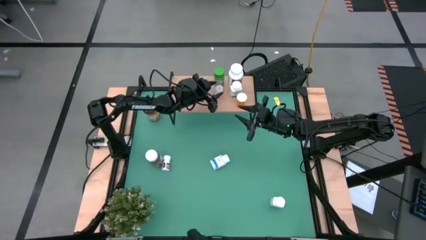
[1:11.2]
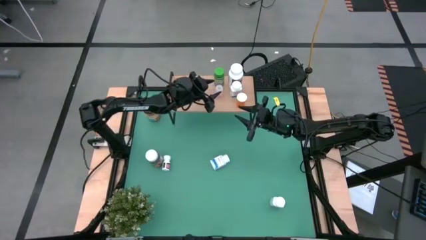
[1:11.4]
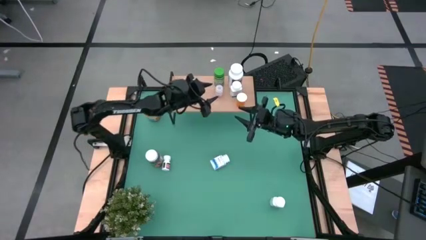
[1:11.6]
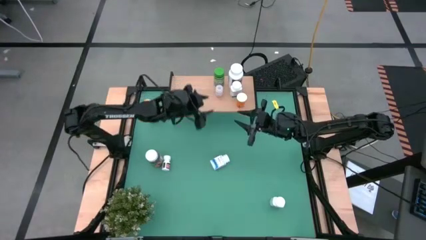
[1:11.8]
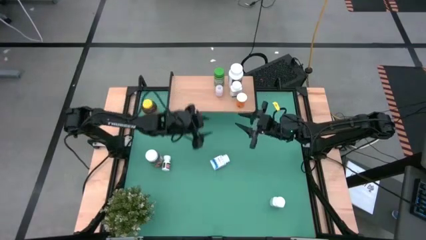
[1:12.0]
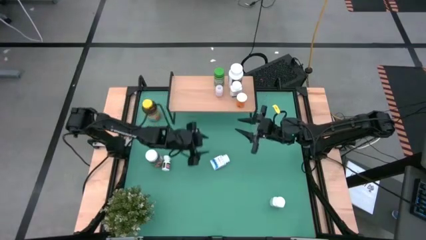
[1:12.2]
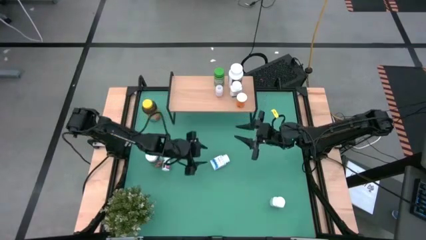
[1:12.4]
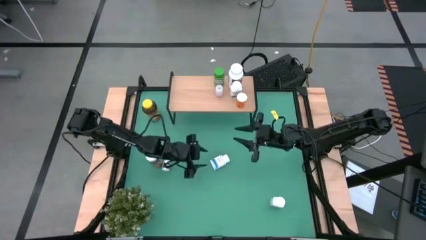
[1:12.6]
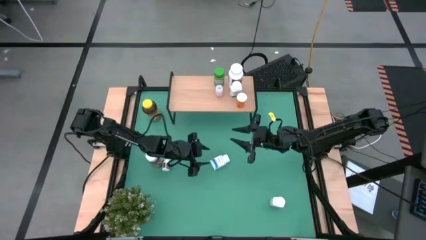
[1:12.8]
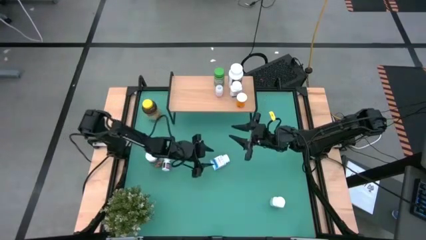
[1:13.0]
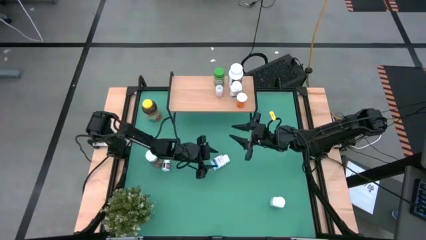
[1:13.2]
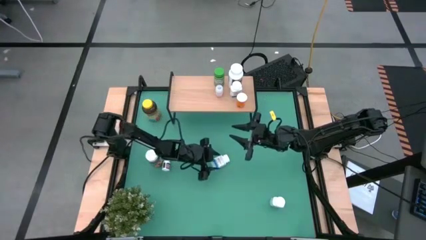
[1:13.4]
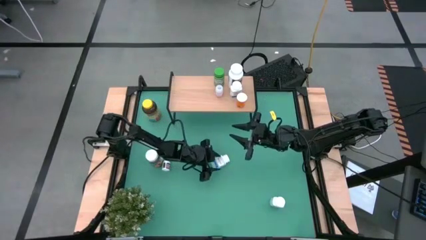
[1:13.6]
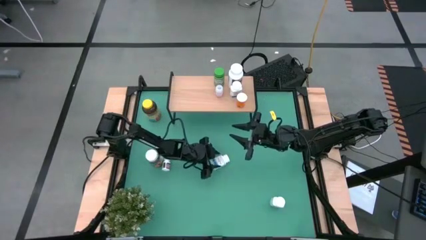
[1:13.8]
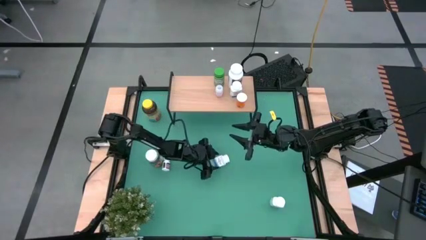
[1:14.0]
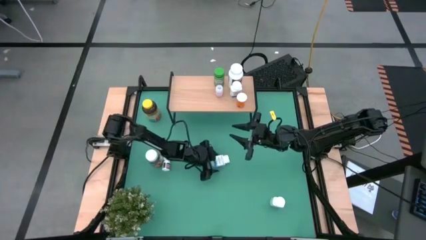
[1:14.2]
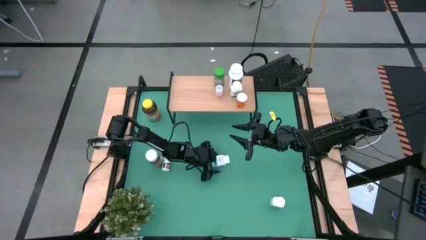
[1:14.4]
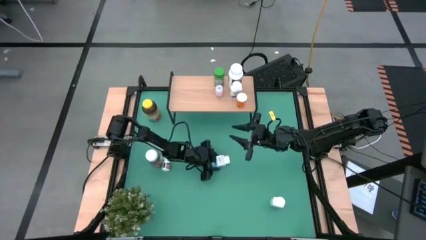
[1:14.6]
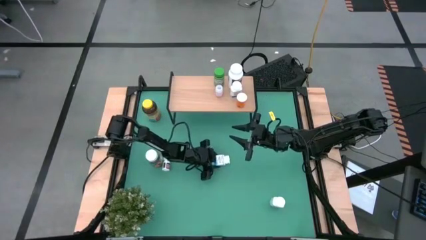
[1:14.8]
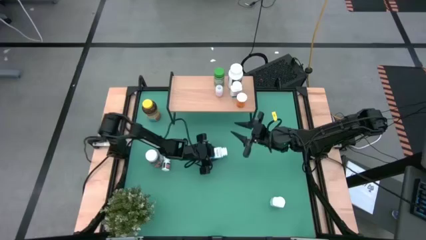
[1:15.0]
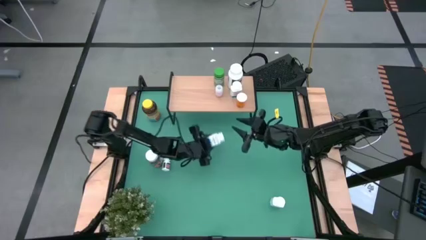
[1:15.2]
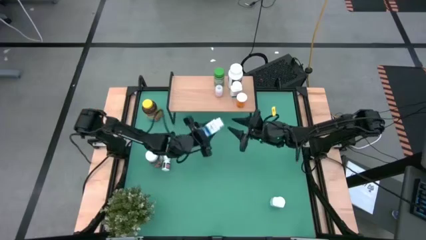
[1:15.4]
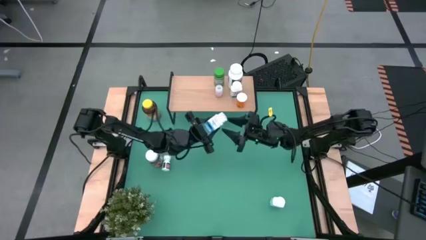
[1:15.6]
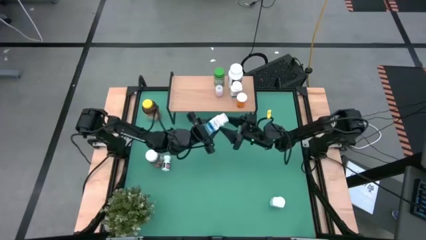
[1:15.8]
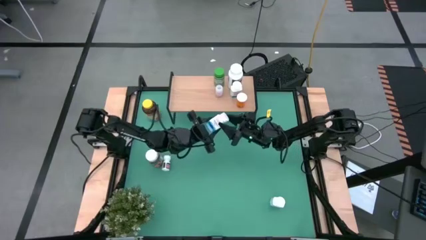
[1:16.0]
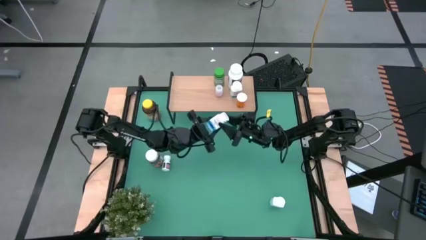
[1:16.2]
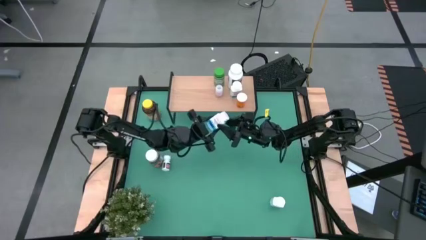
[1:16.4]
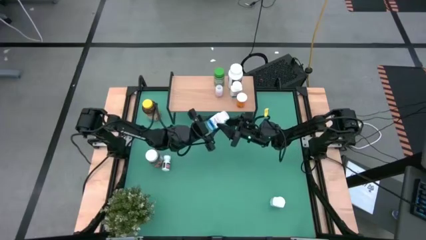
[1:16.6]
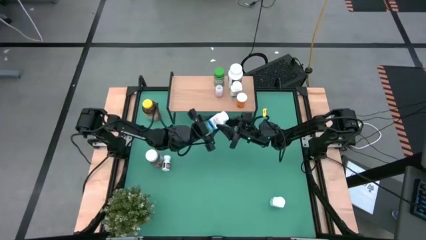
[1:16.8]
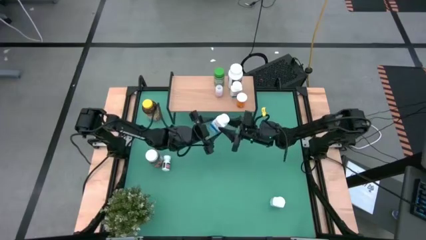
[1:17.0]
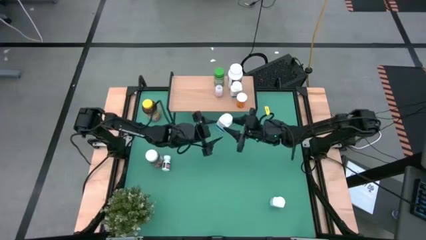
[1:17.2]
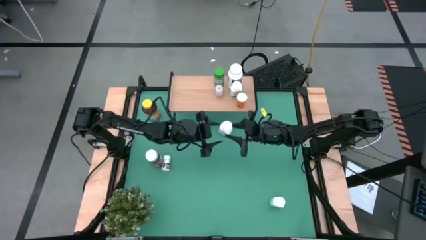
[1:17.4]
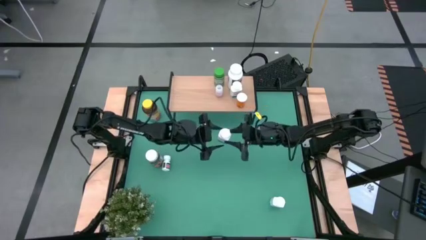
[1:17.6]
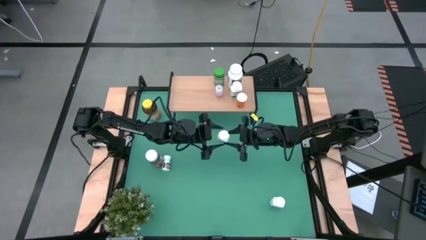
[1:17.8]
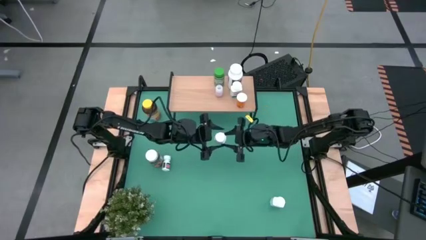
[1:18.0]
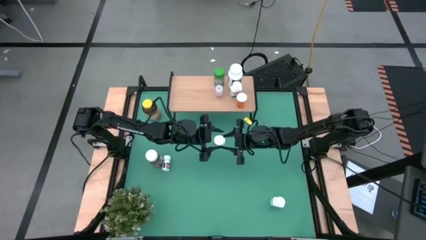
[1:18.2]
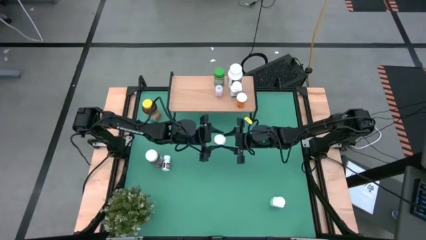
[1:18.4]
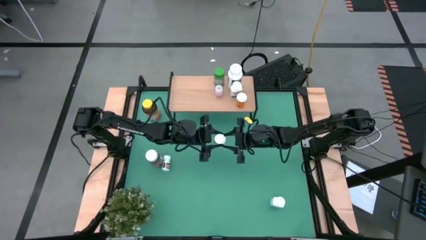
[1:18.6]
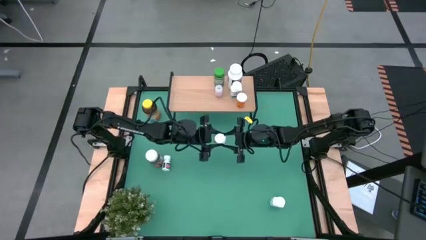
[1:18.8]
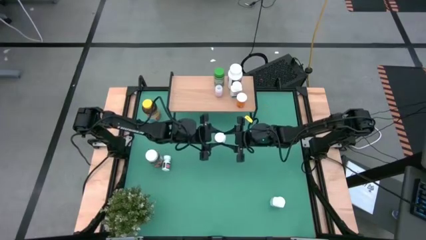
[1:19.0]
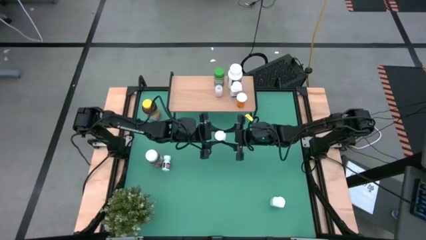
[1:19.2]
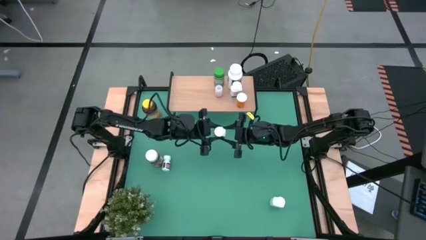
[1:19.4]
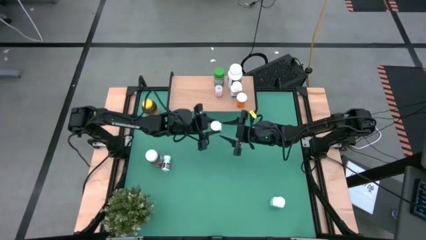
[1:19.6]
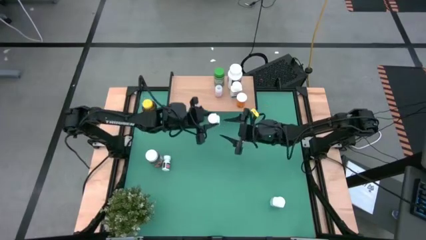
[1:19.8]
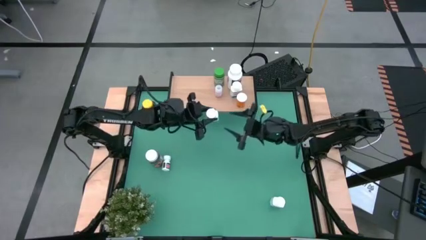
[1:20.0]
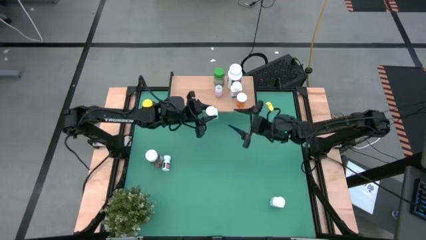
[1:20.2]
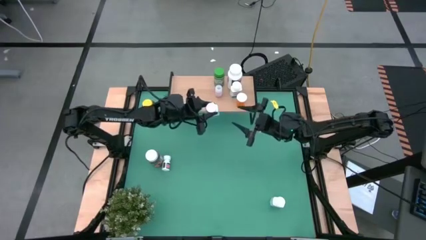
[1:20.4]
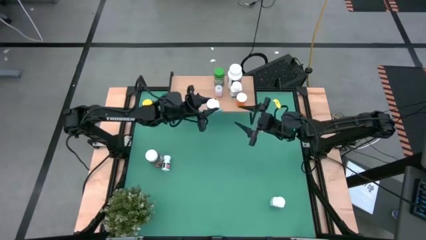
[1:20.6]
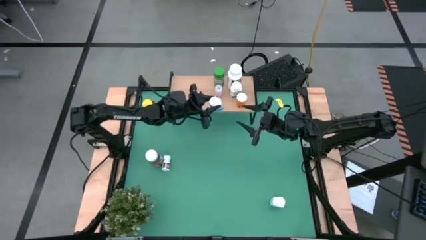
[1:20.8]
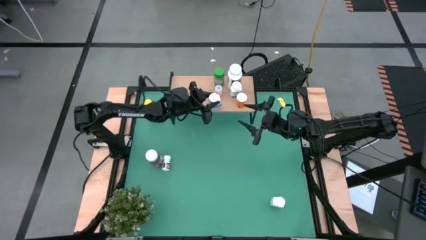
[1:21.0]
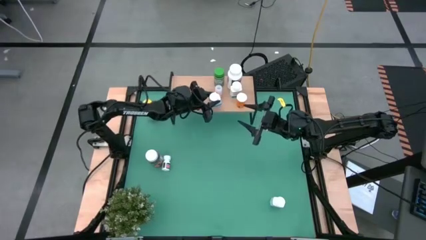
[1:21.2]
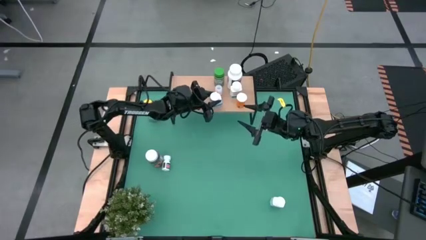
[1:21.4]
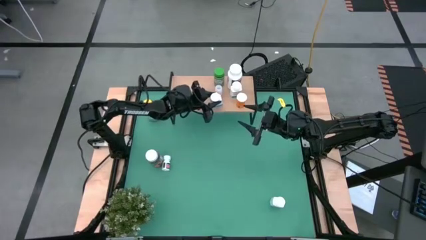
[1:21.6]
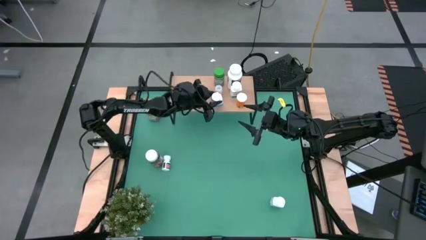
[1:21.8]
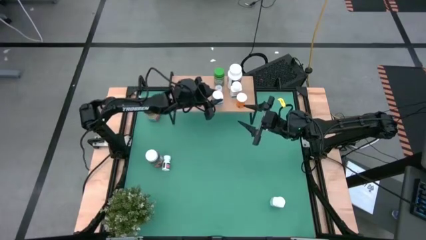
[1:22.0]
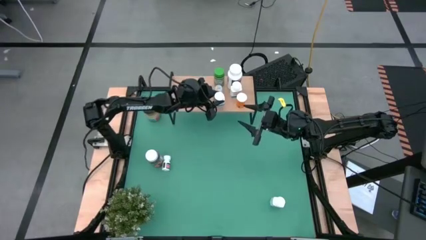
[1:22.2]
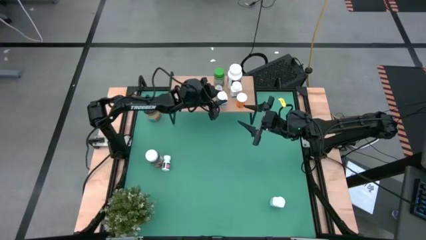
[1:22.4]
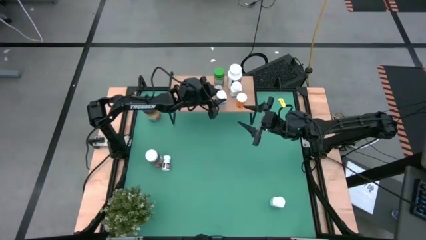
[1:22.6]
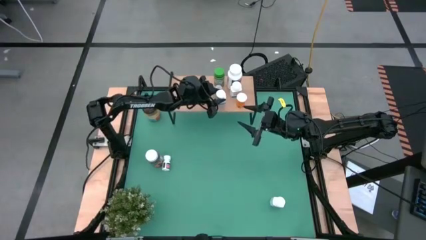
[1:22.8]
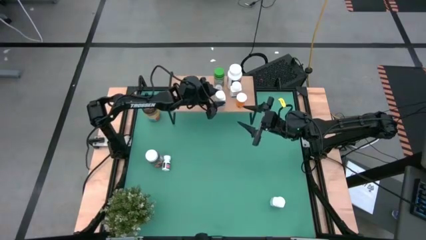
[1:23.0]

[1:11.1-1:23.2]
Task: Pick and place medicine bottles onto shelf by color
Put the top white blue medicine bottle on the shelf
